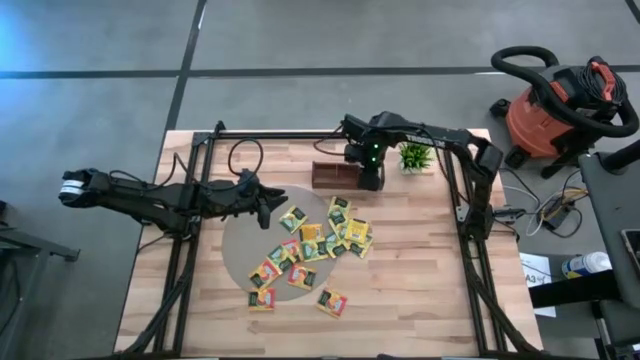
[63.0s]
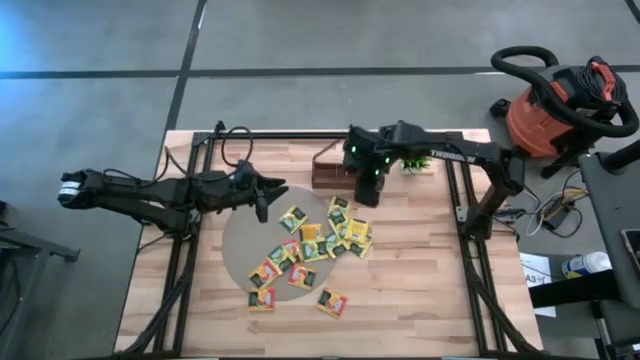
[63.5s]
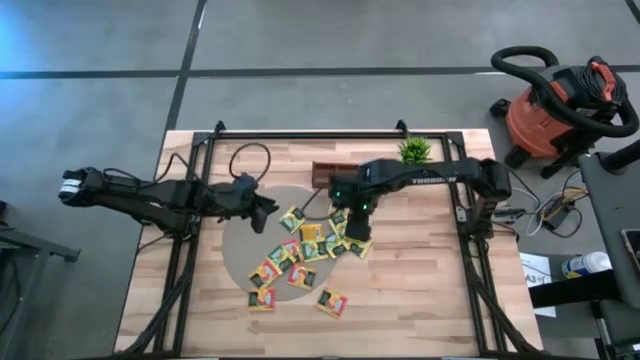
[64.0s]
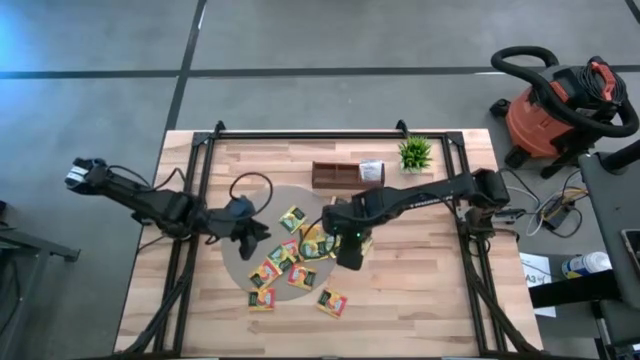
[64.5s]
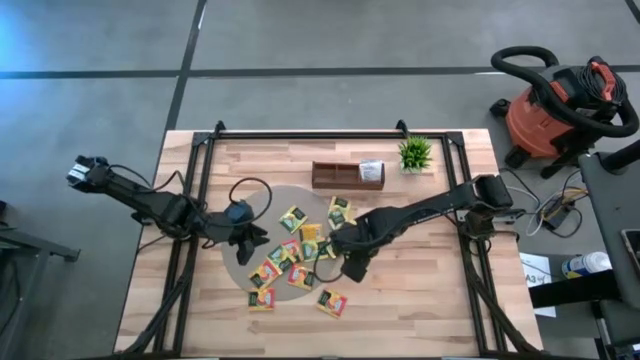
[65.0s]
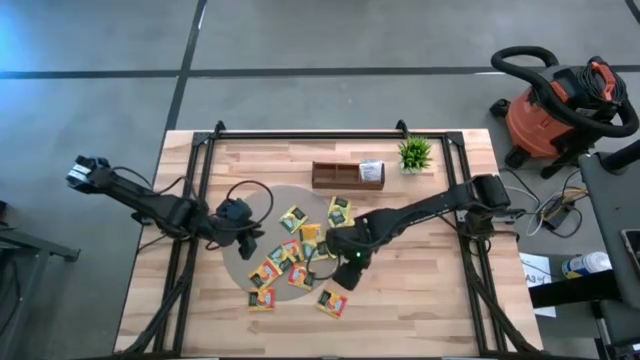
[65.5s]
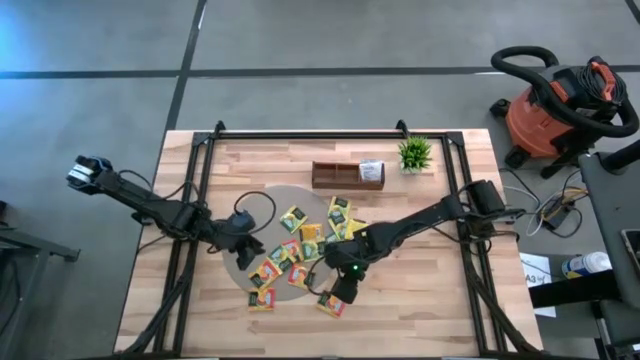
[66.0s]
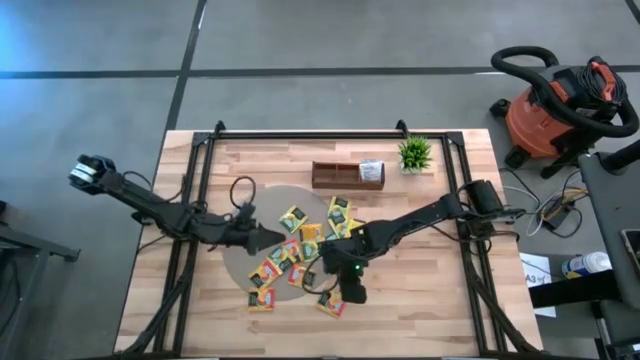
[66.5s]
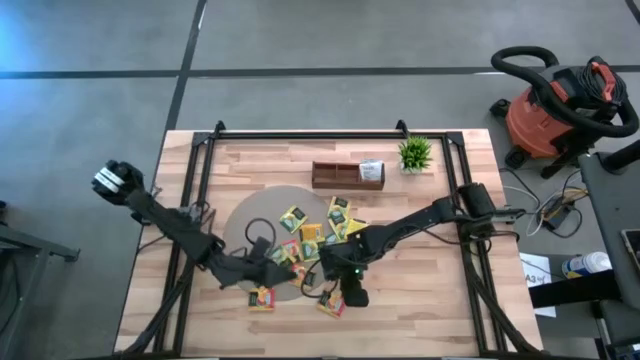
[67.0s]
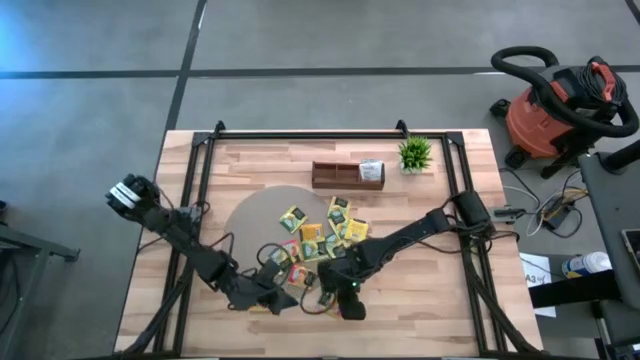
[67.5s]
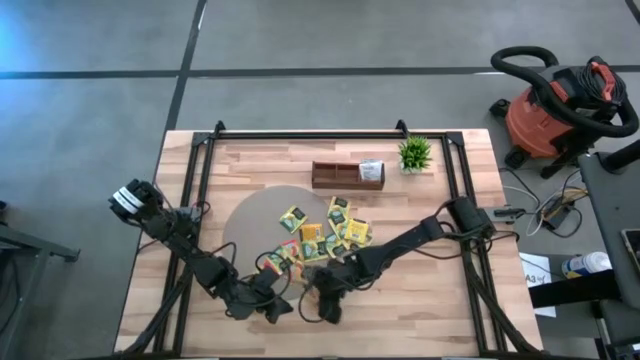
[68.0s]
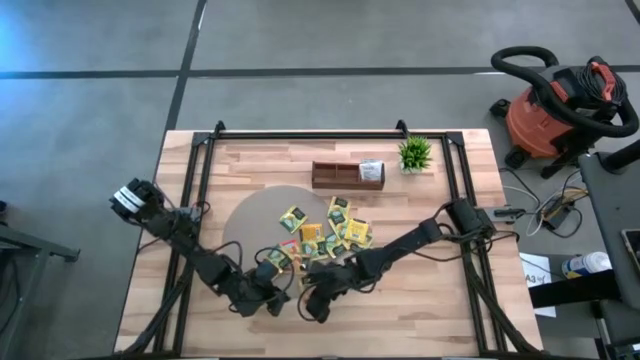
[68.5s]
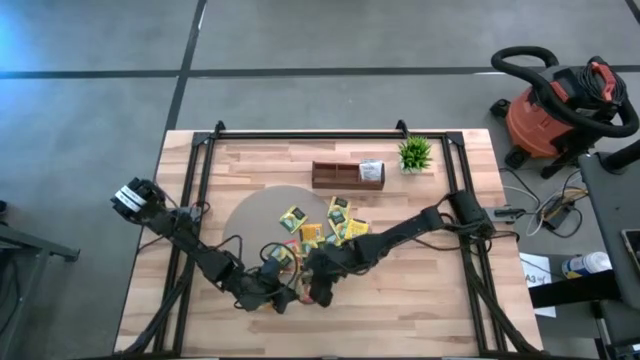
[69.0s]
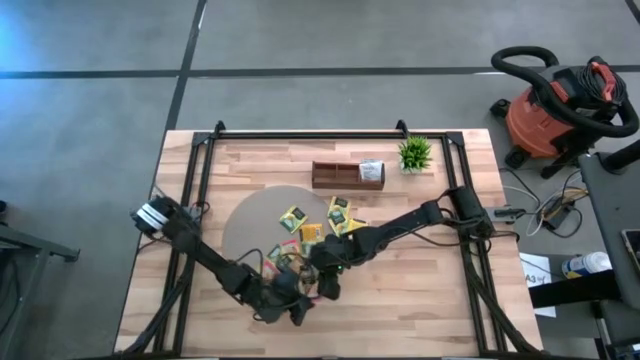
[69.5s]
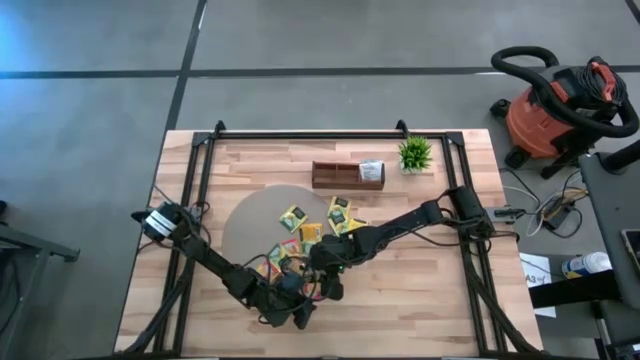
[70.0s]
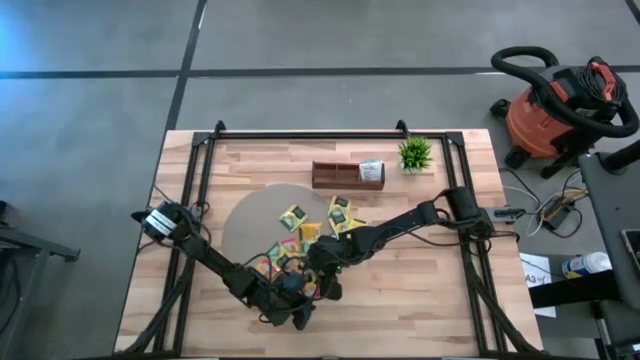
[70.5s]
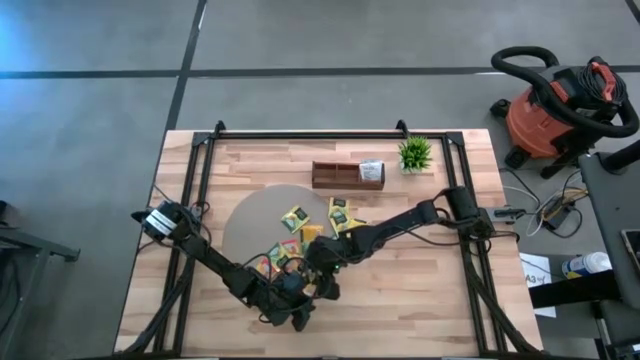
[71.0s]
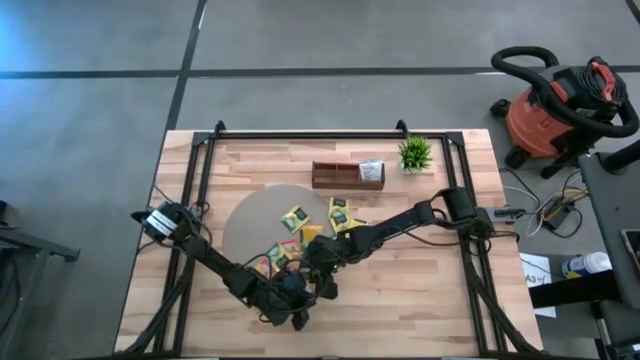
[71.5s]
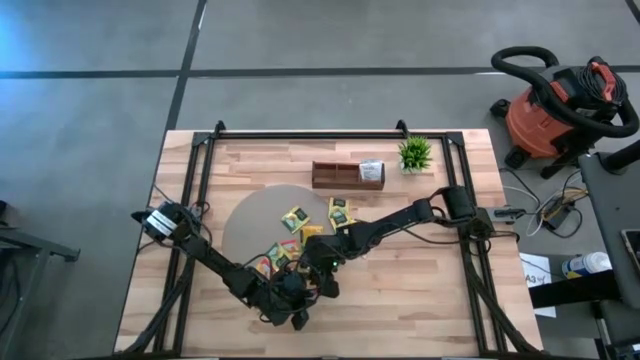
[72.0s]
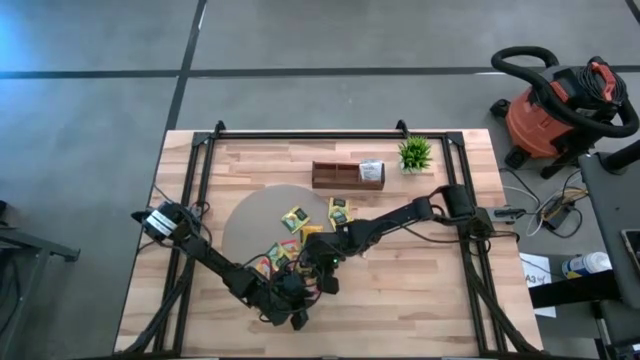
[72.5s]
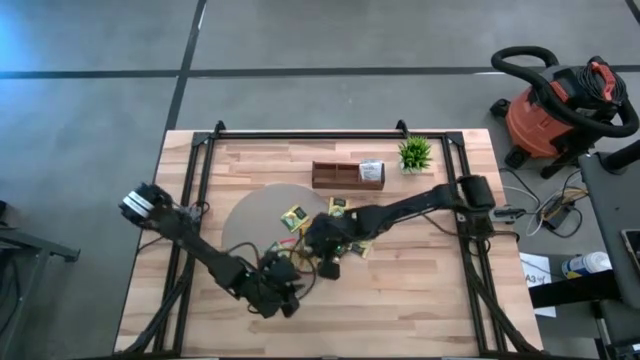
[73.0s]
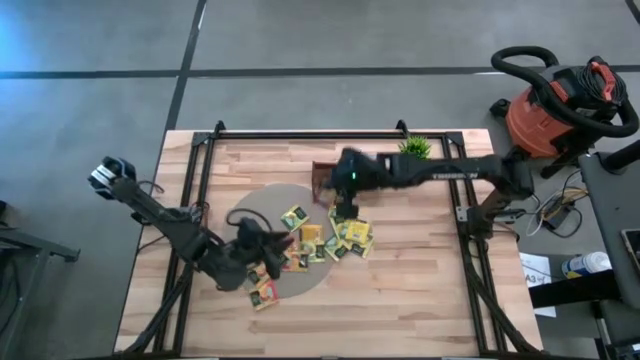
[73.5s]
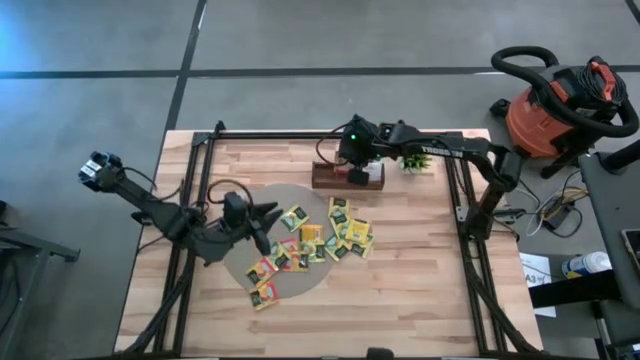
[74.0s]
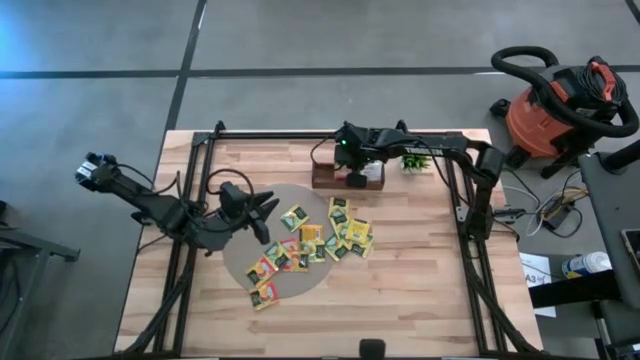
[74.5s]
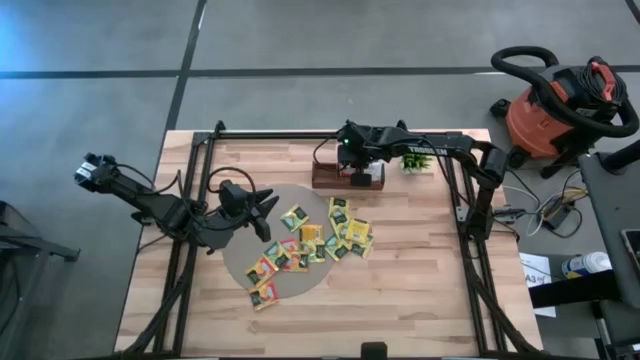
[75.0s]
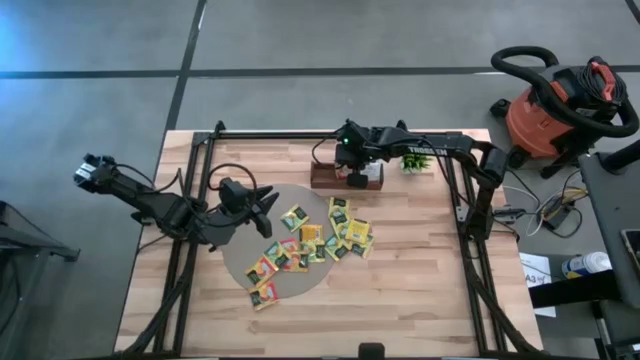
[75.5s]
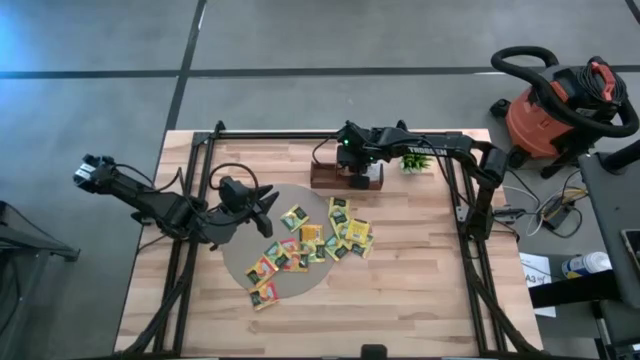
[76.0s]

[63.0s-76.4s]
Task: Pick & Place Tea
Put the red tea sachet into the middle compartment of the wooden organizer

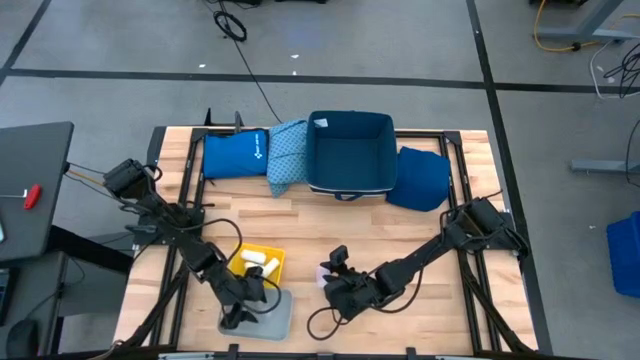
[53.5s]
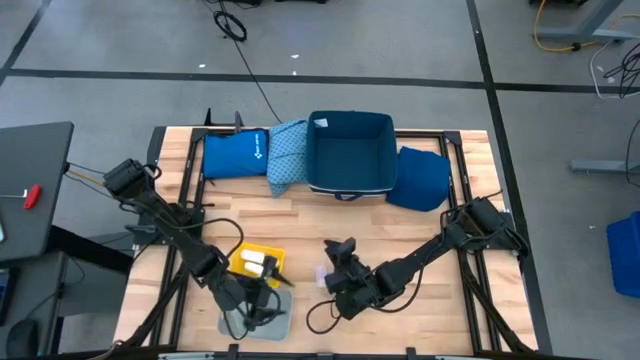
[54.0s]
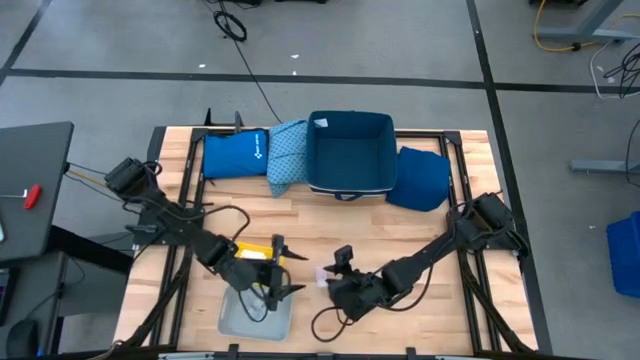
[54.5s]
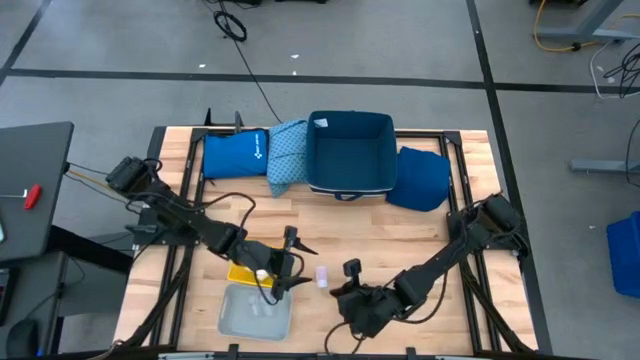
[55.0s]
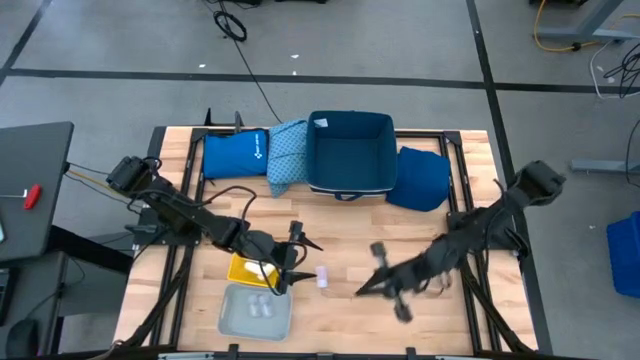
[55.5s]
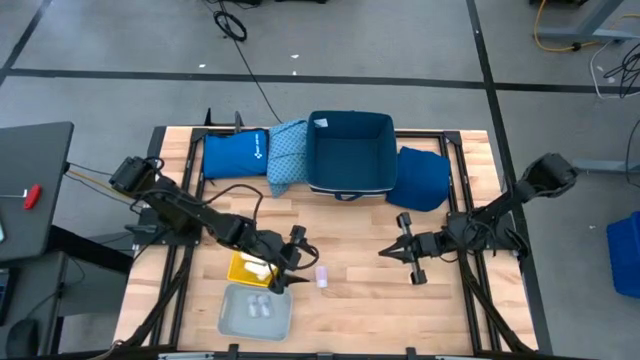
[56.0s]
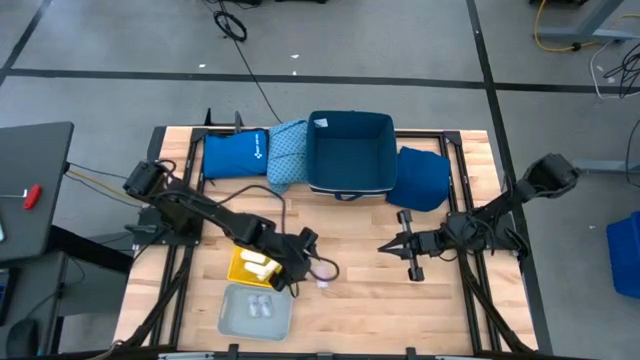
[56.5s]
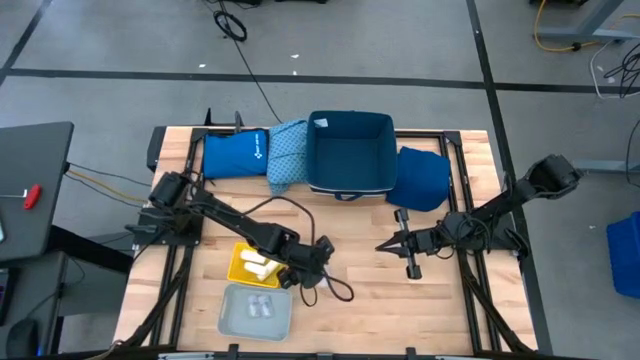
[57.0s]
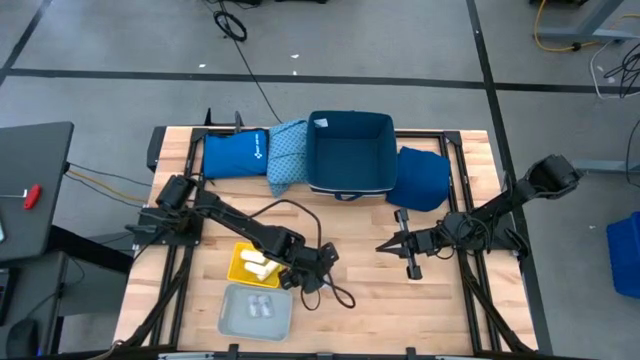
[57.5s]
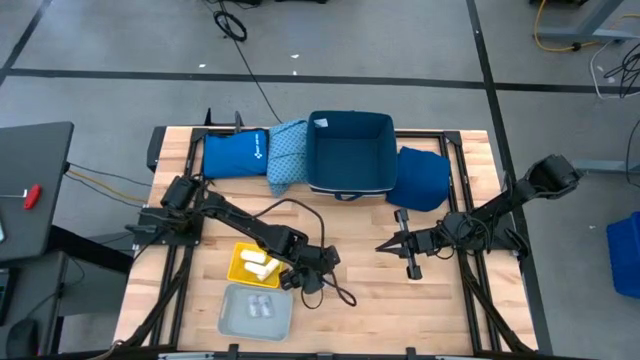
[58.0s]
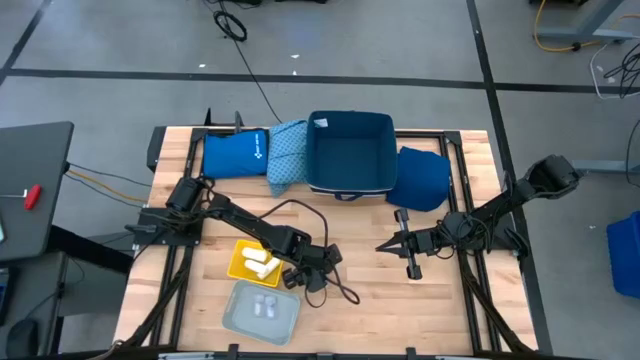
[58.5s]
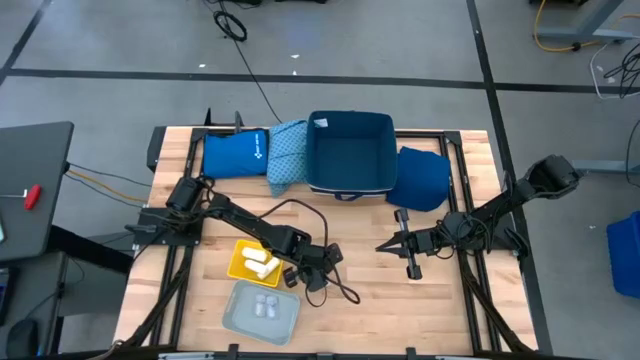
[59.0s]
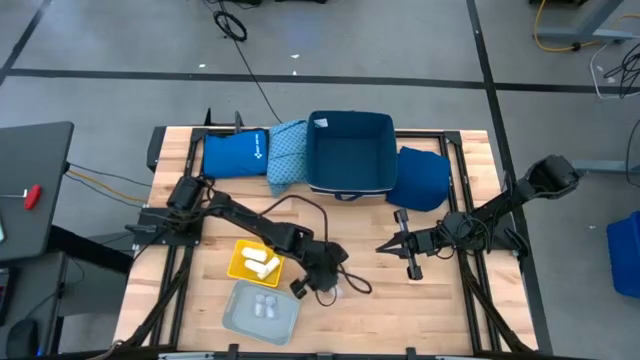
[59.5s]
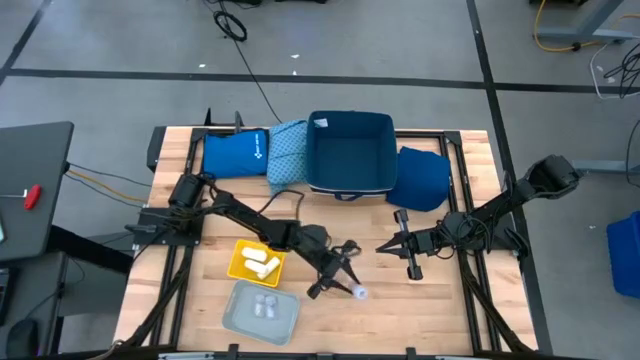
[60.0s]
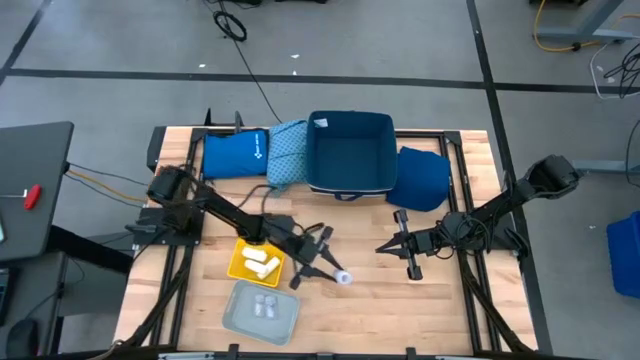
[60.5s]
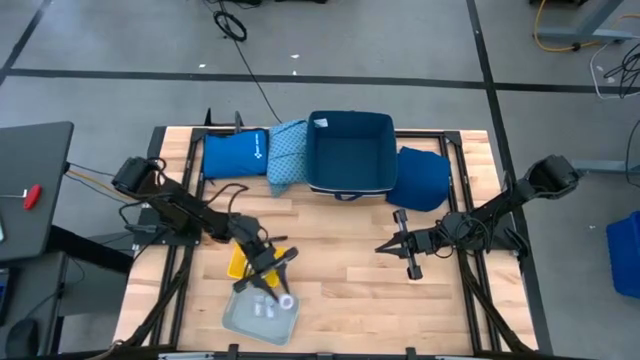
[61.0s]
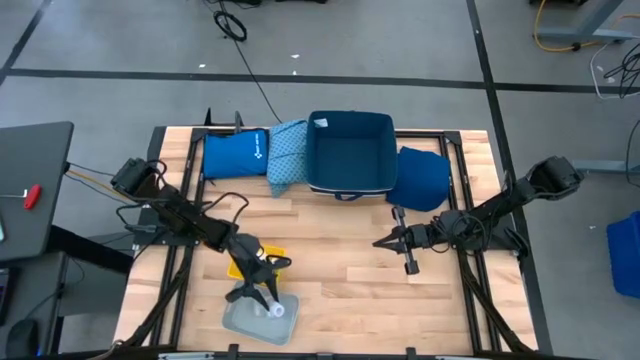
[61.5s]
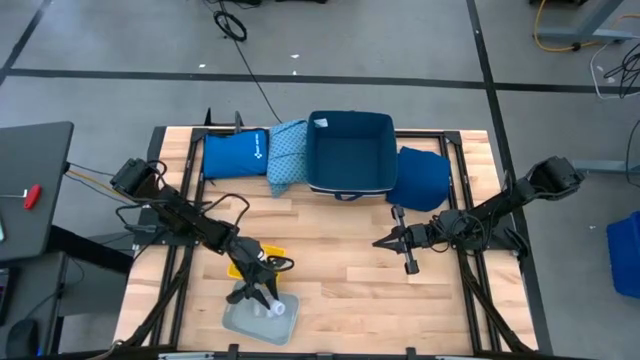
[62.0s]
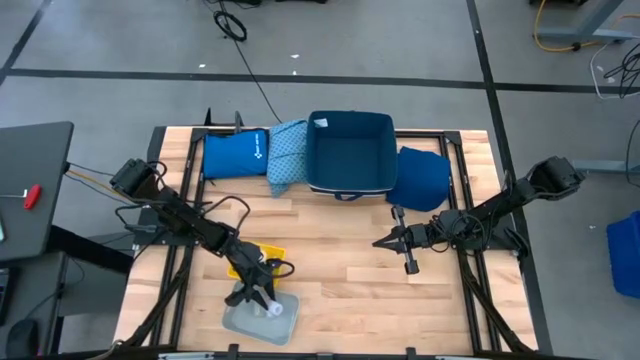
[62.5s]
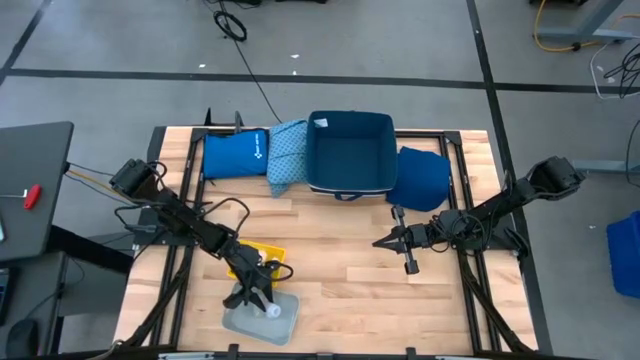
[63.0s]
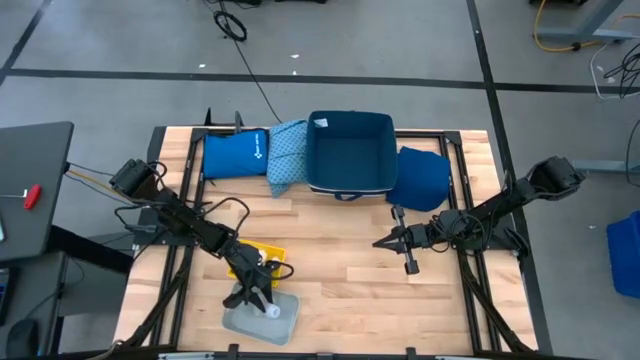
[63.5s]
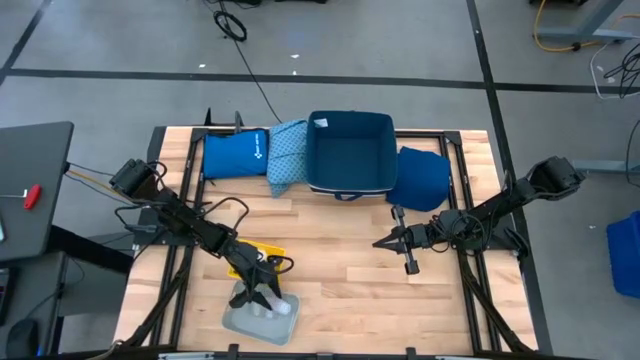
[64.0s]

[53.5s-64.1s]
Task: Pick & place medical supplies in basket/bin
Put the white pill bottle into the gray bin
